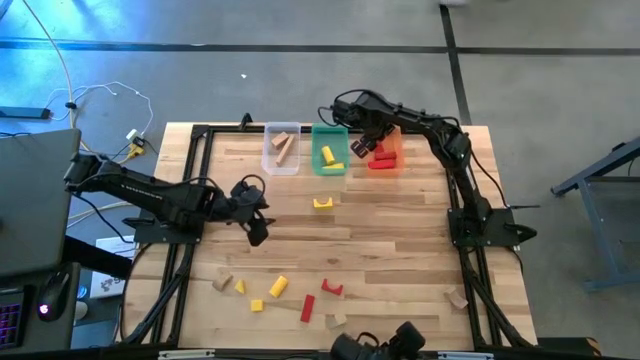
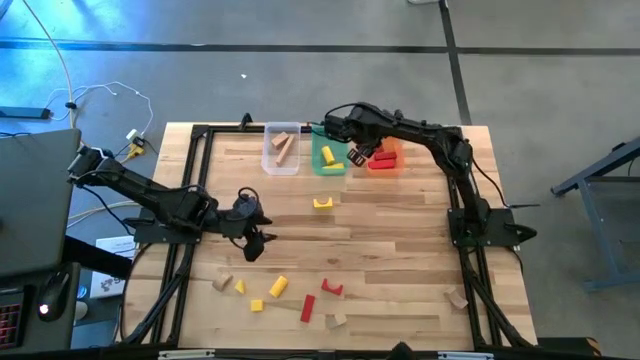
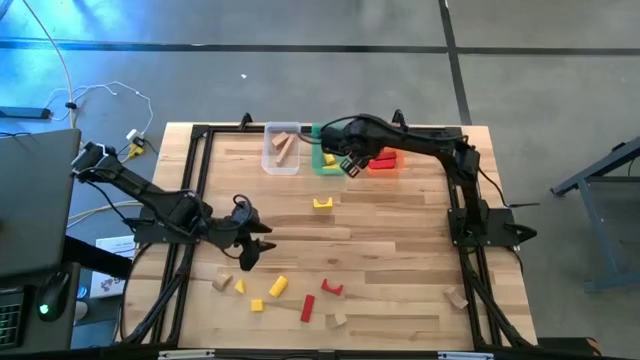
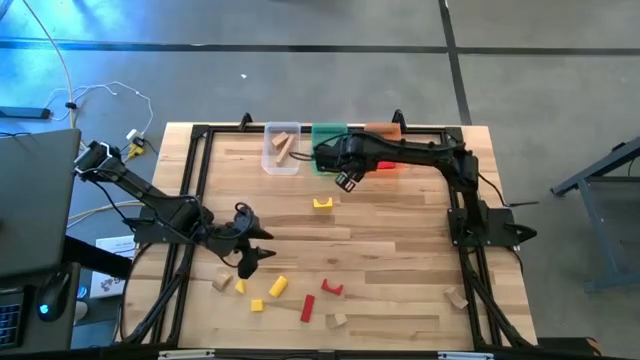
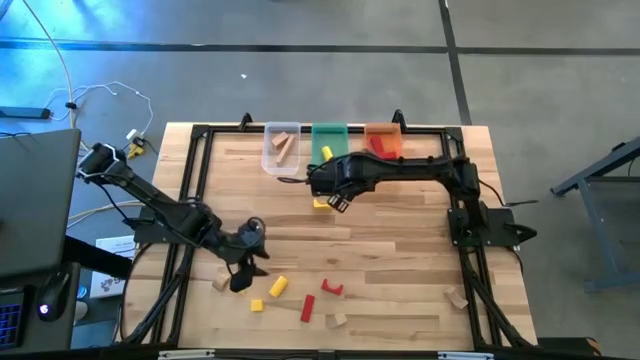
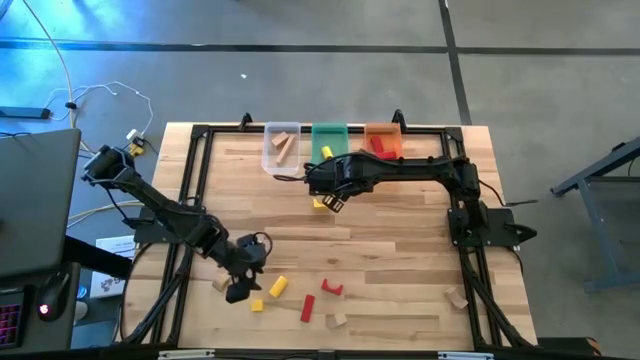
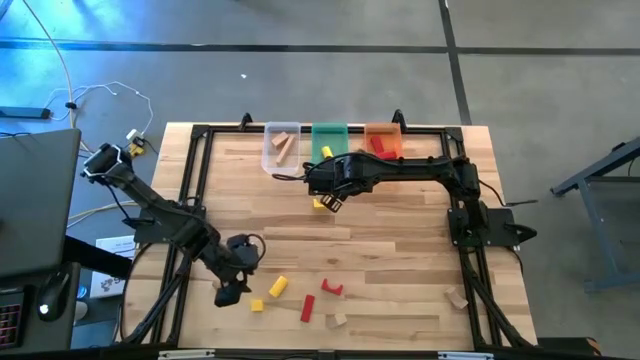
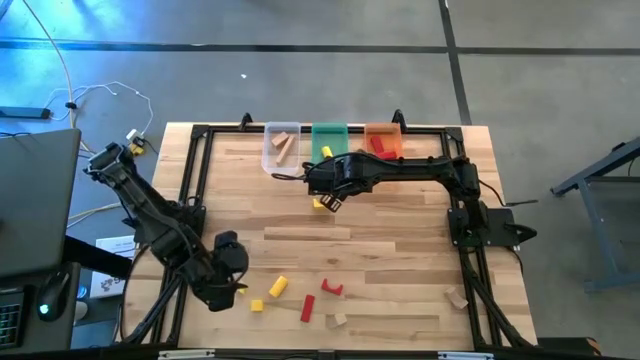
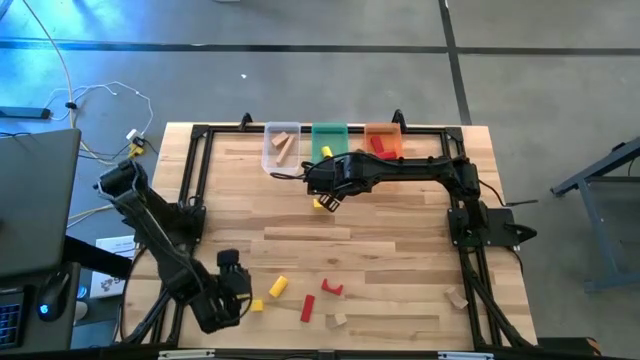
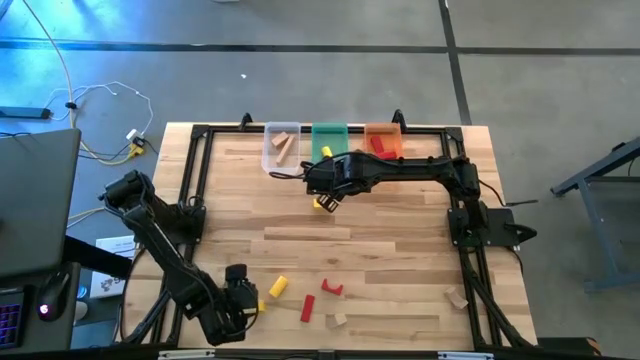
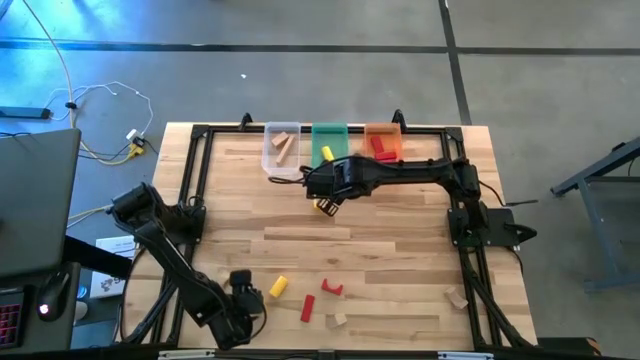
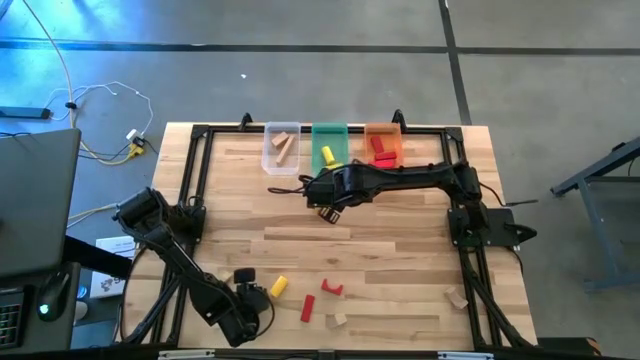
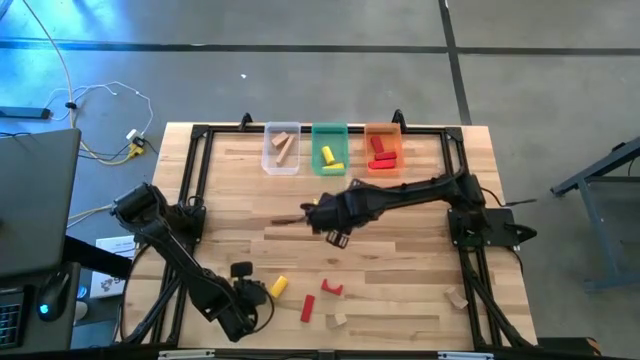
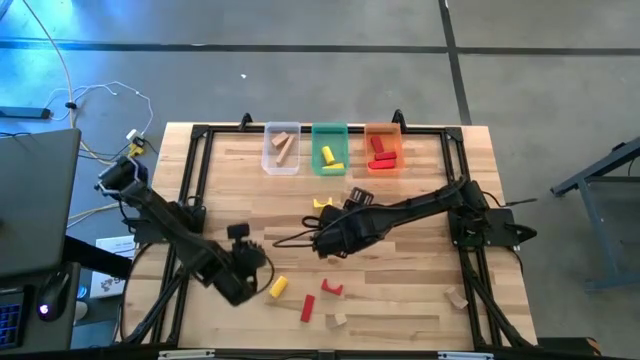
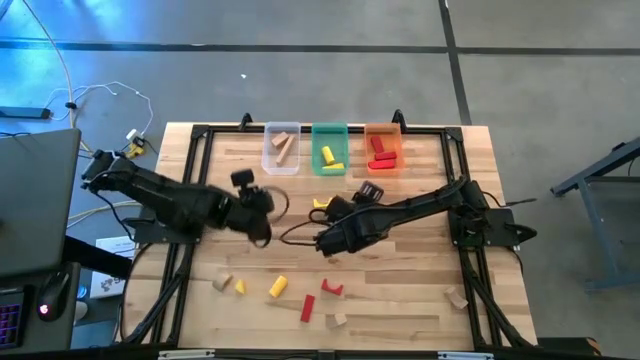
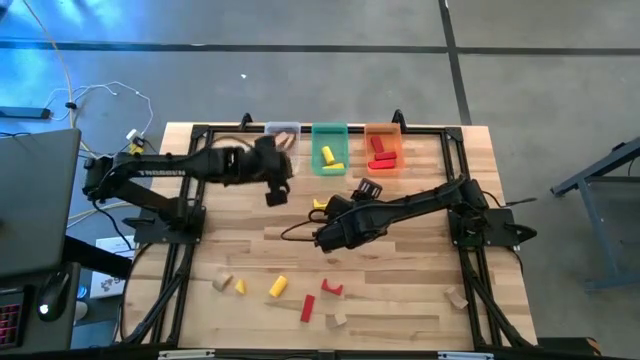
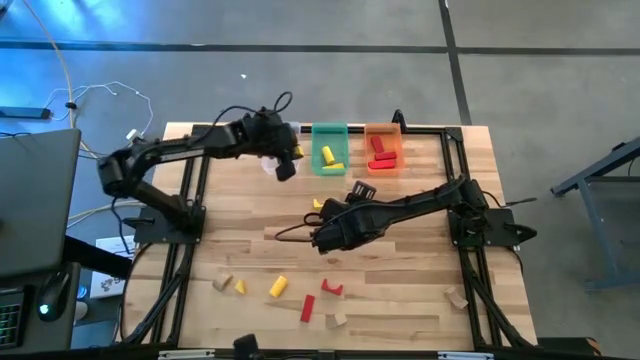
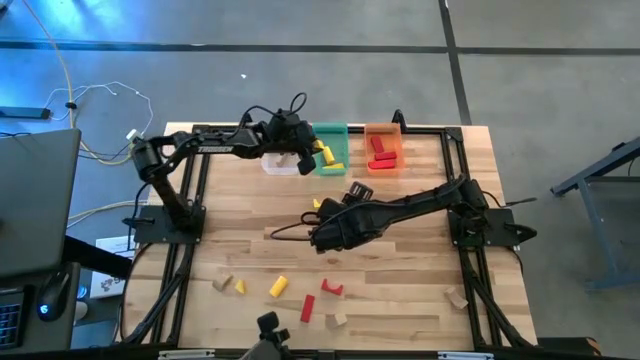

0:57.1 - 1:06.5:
Task: Sort & place blocks by color
Put the yellow block into the green transparent bin

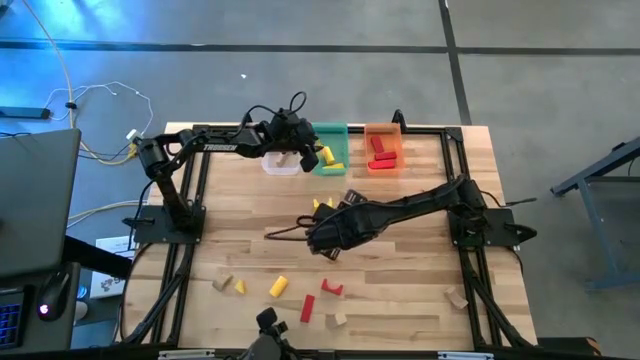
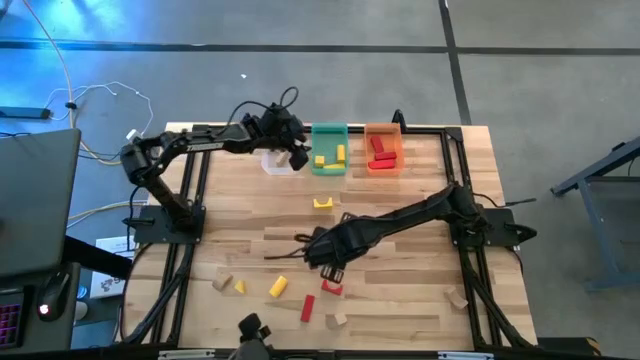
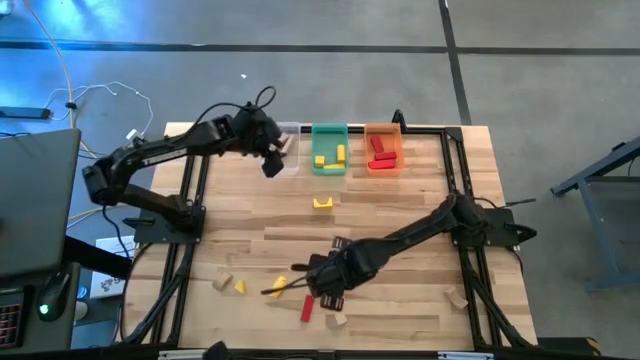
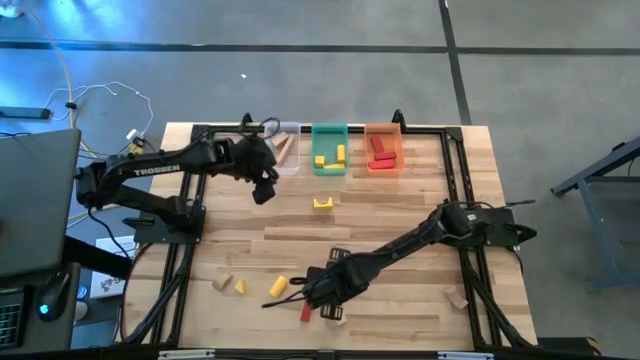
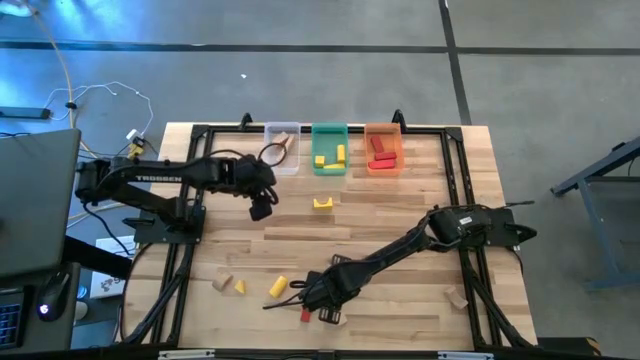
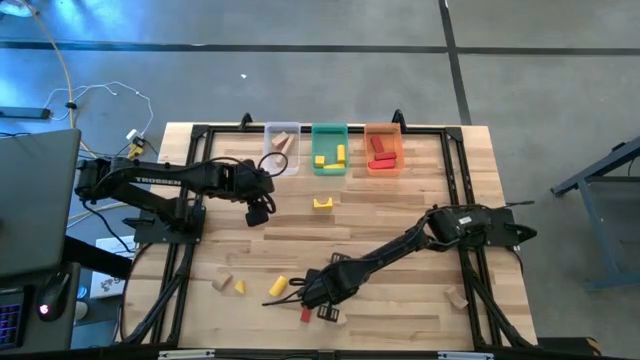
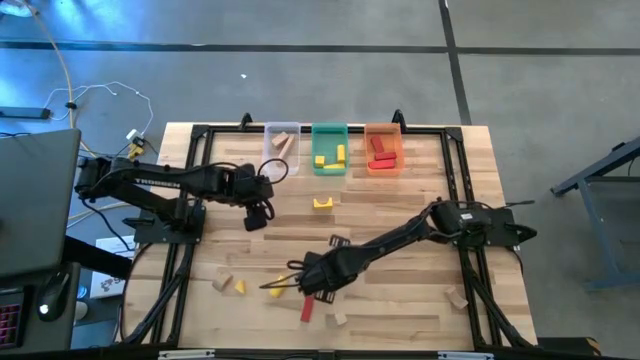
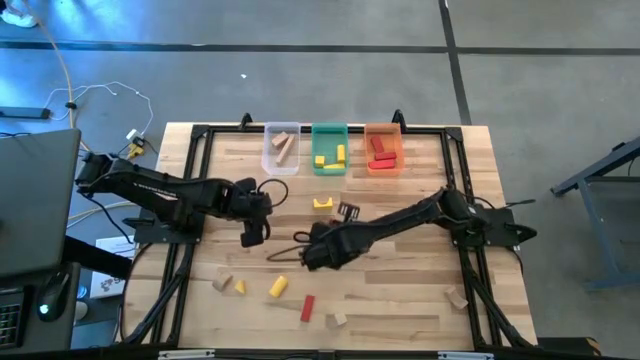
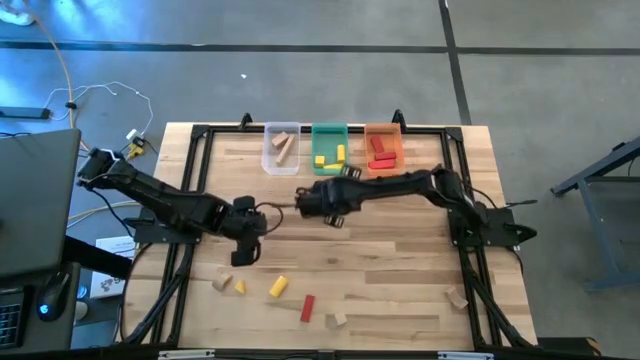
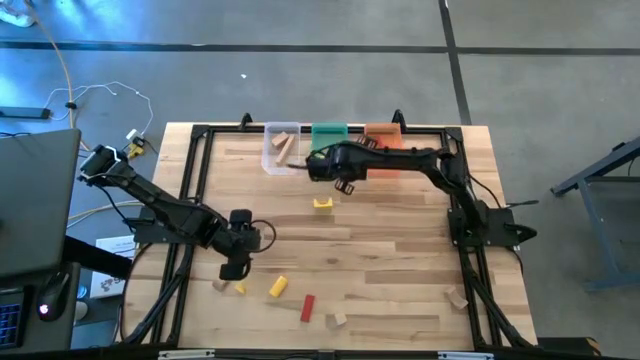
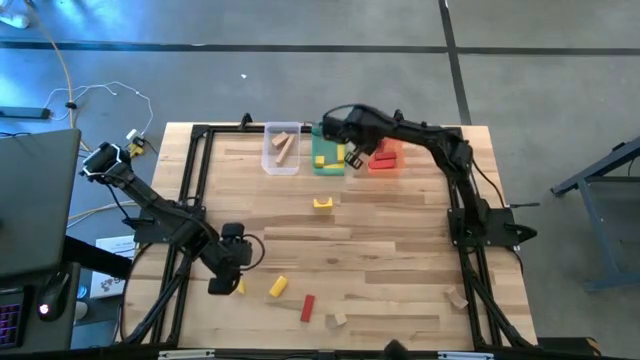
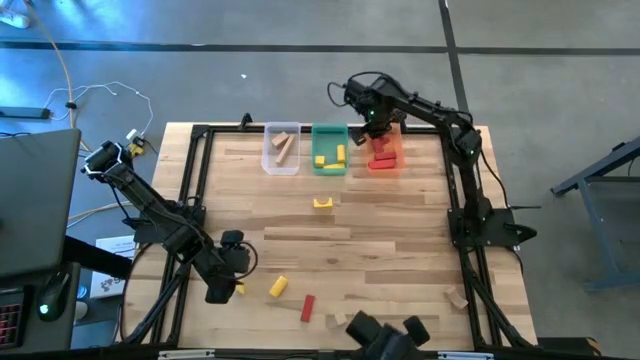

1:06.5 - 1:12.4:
Put the red block into the orange transparent bin

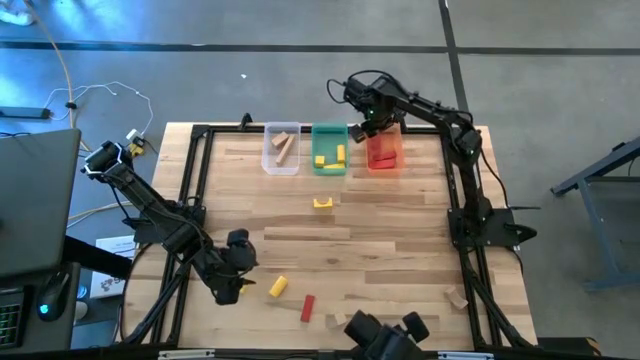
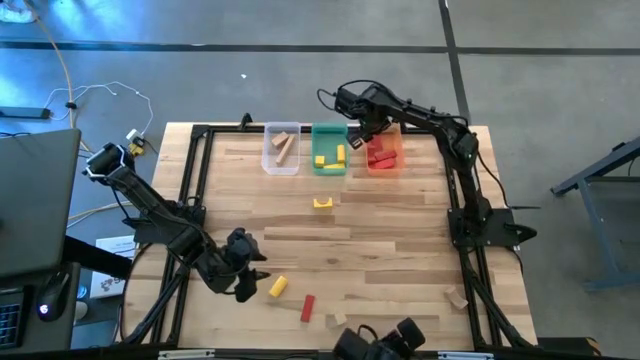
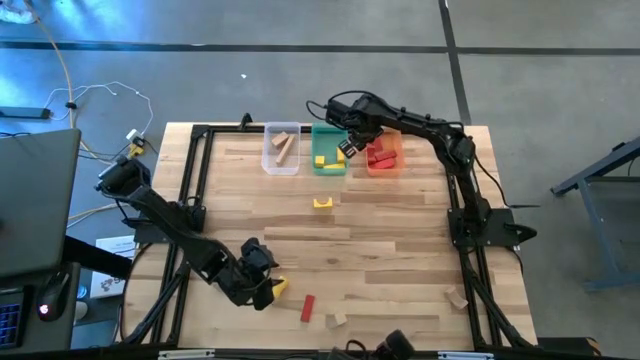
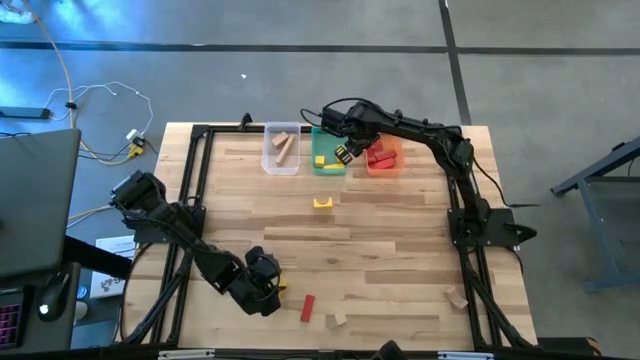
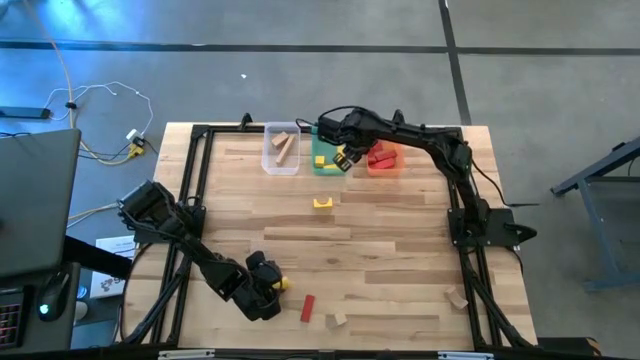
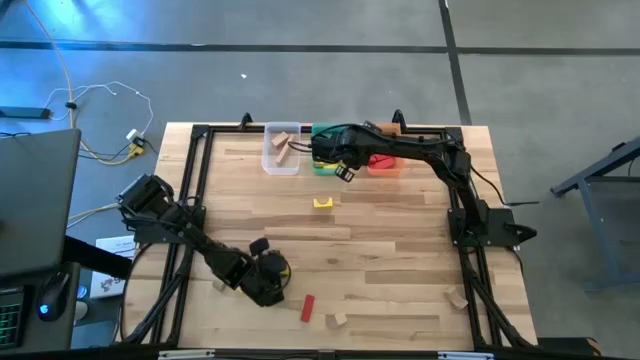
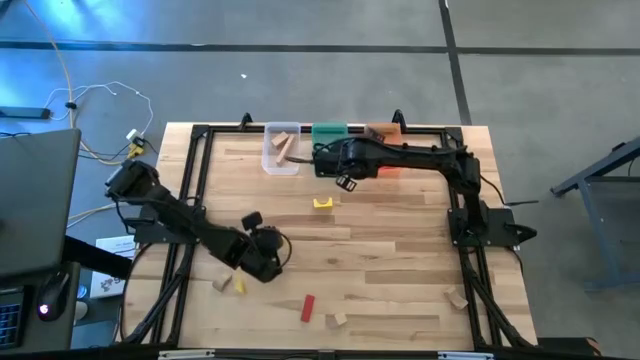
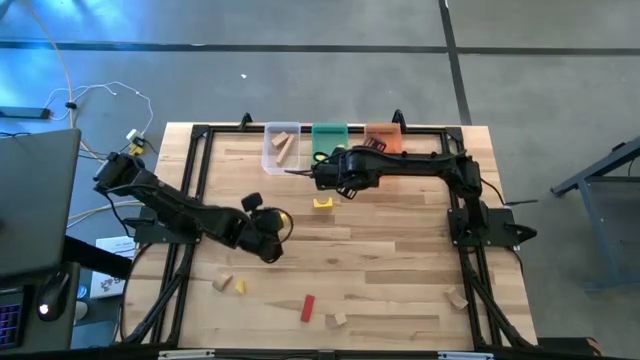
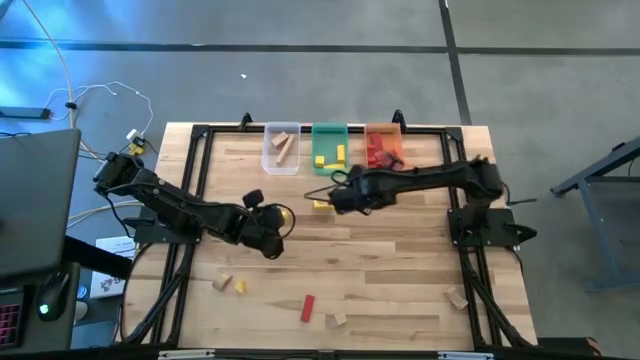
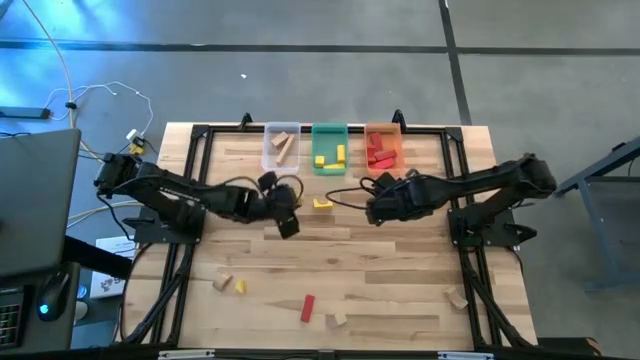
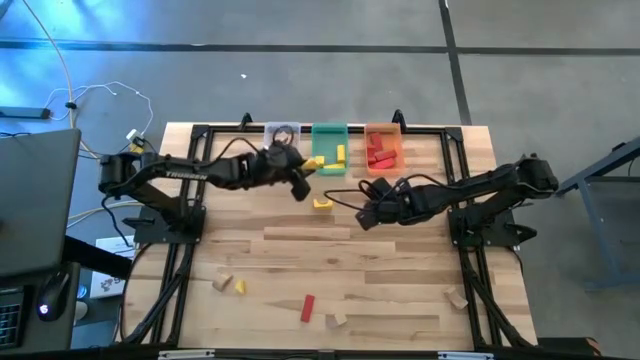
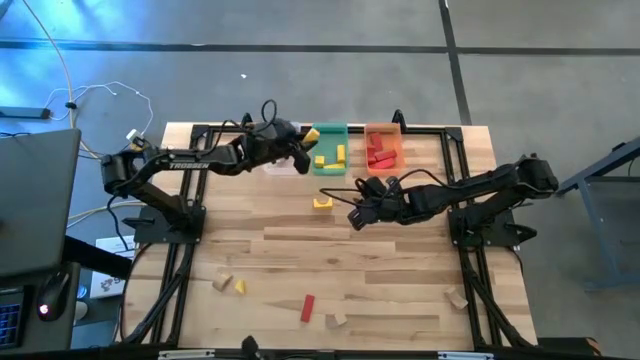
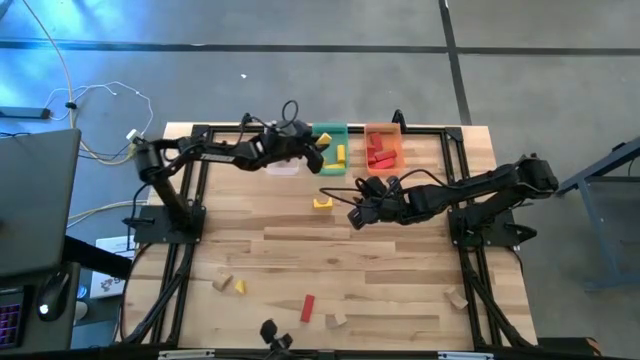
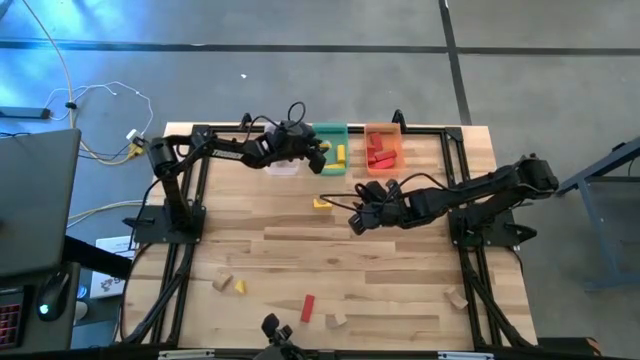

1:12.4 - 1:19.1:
Put the yellow block into the green transparent bin
